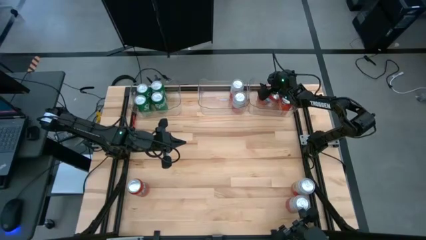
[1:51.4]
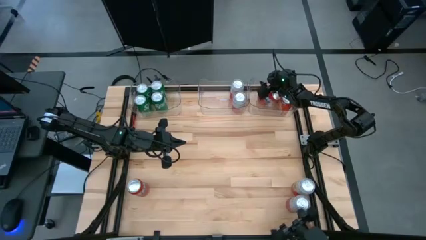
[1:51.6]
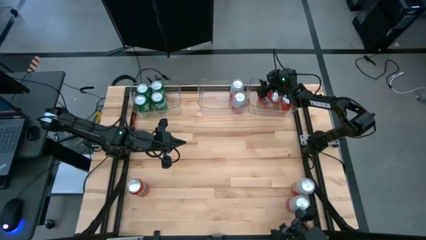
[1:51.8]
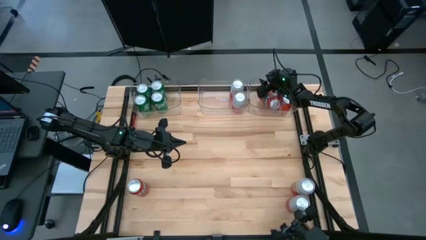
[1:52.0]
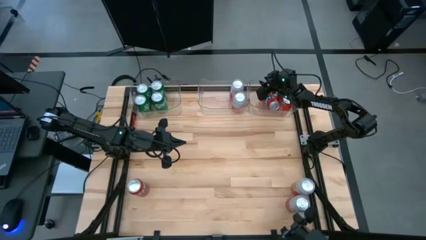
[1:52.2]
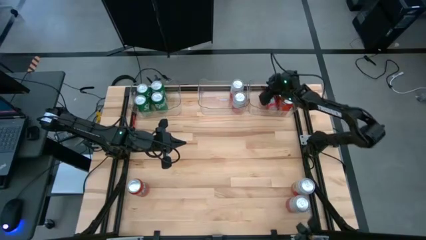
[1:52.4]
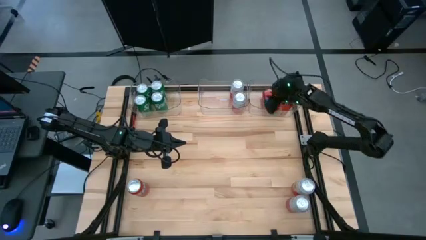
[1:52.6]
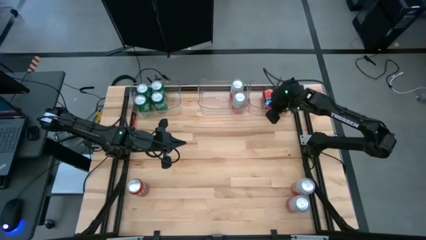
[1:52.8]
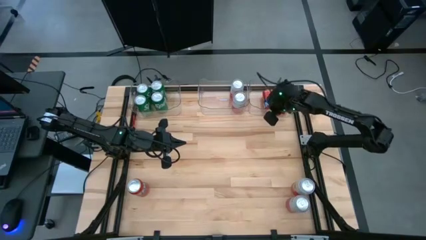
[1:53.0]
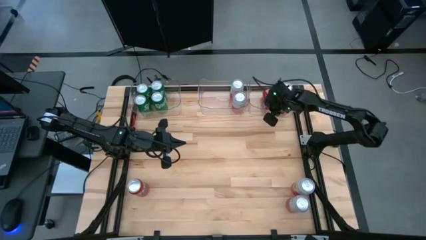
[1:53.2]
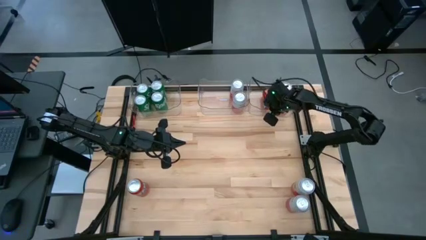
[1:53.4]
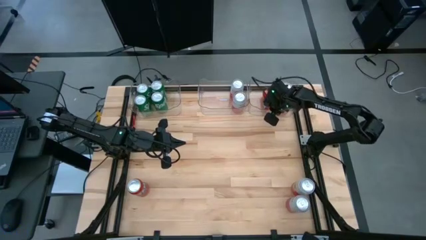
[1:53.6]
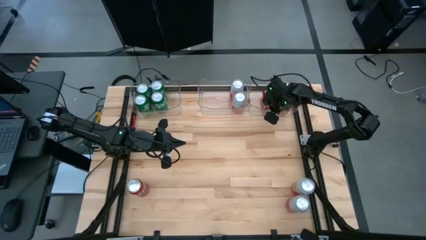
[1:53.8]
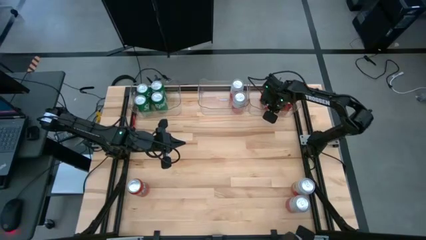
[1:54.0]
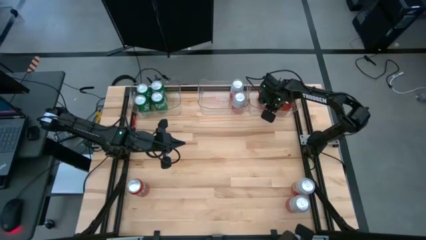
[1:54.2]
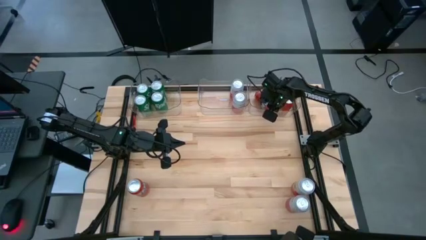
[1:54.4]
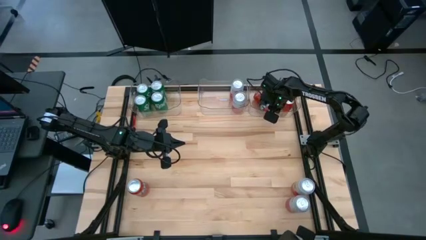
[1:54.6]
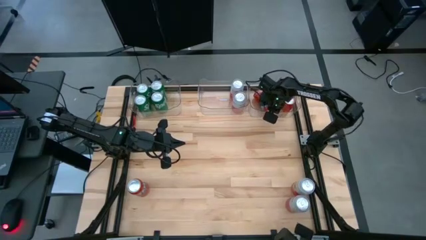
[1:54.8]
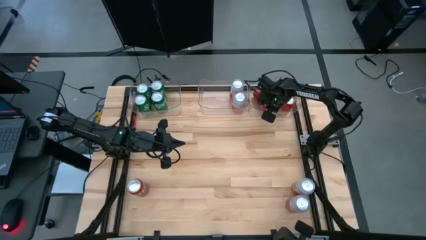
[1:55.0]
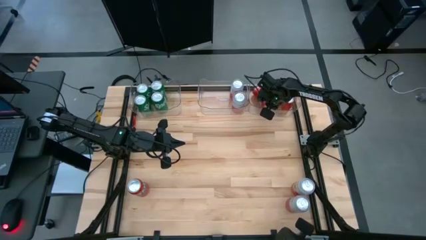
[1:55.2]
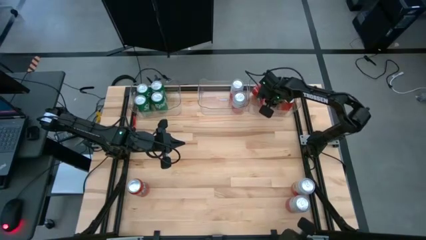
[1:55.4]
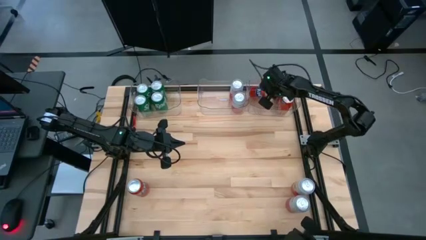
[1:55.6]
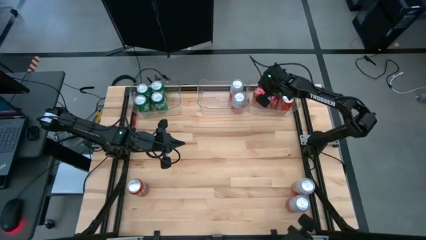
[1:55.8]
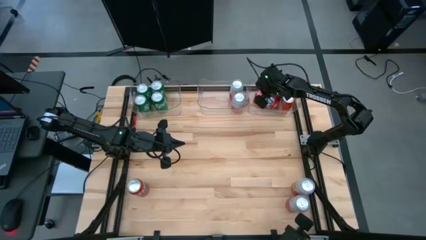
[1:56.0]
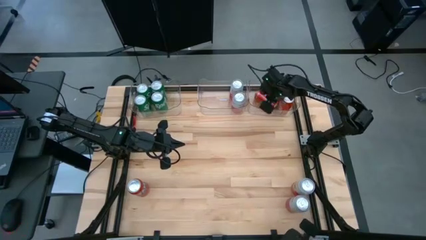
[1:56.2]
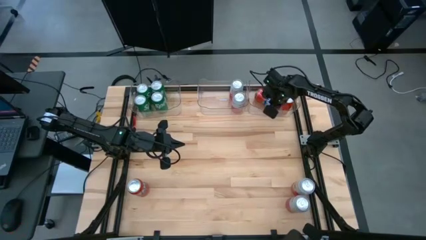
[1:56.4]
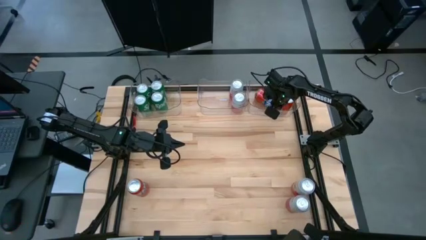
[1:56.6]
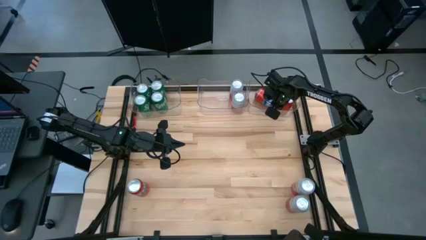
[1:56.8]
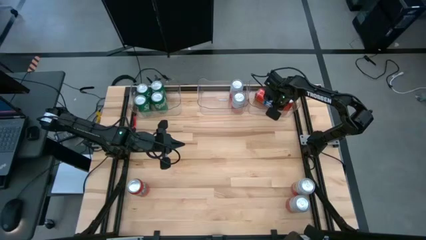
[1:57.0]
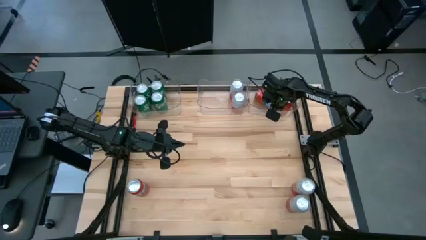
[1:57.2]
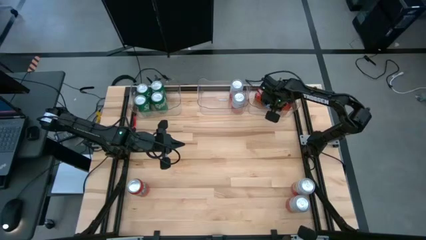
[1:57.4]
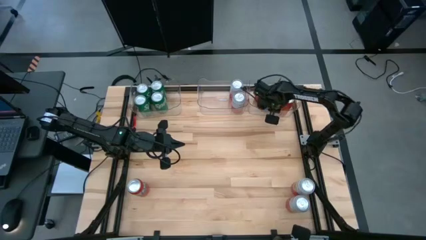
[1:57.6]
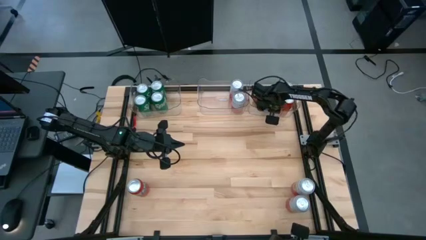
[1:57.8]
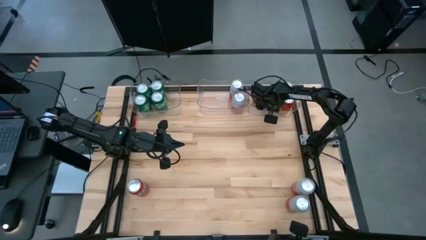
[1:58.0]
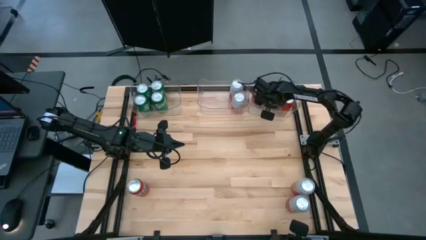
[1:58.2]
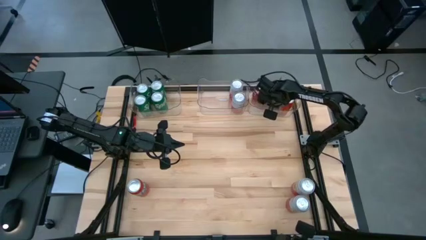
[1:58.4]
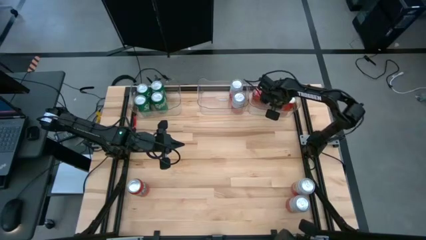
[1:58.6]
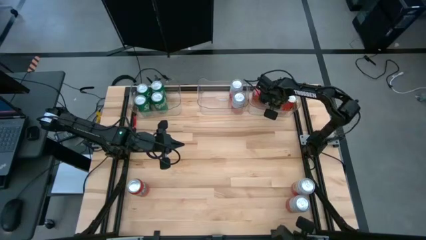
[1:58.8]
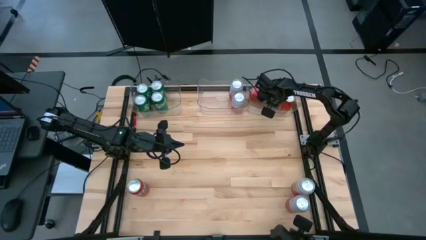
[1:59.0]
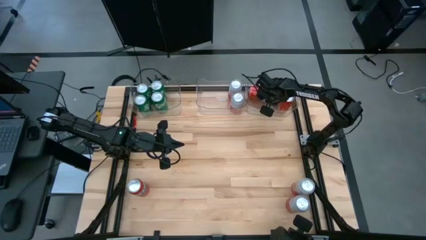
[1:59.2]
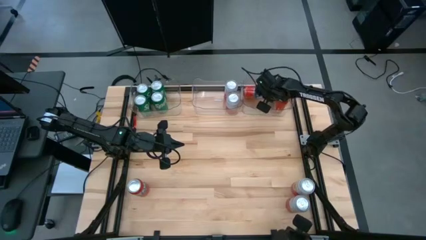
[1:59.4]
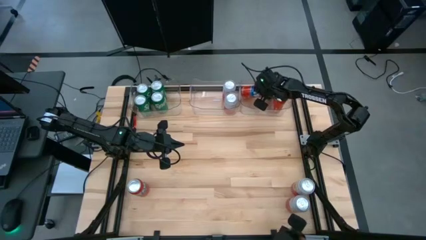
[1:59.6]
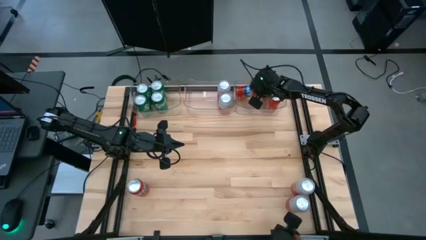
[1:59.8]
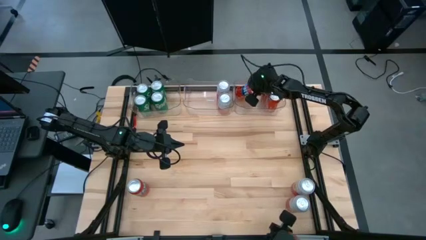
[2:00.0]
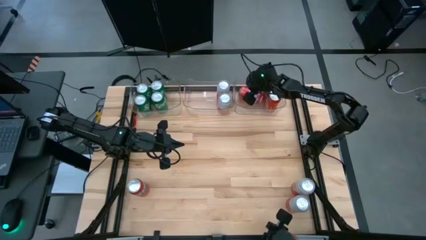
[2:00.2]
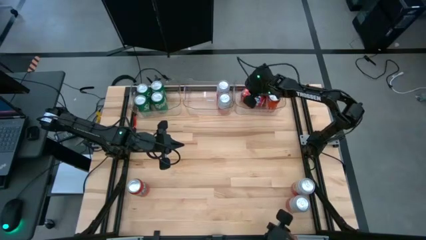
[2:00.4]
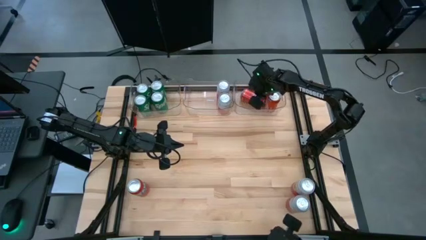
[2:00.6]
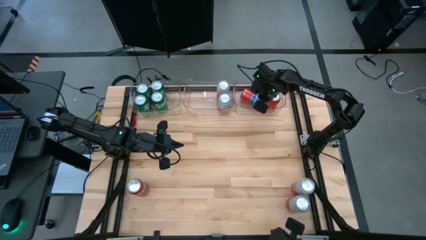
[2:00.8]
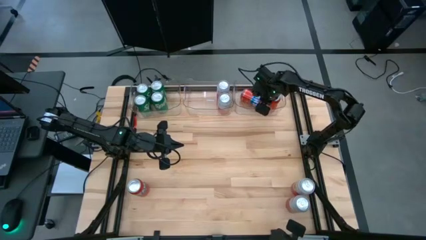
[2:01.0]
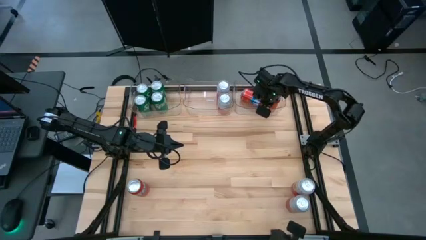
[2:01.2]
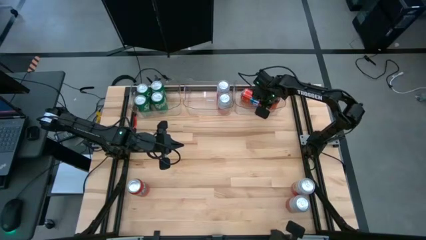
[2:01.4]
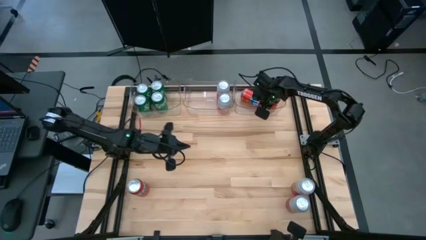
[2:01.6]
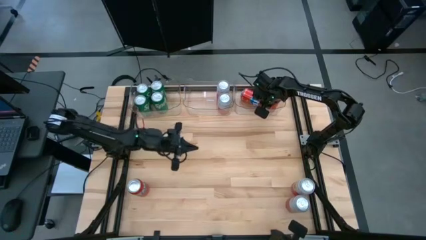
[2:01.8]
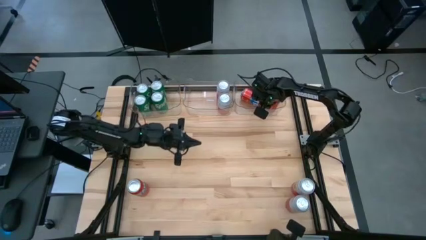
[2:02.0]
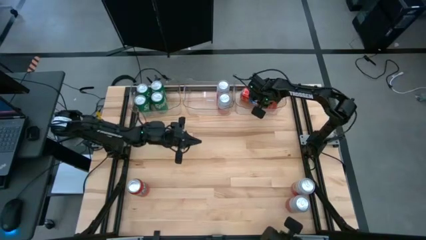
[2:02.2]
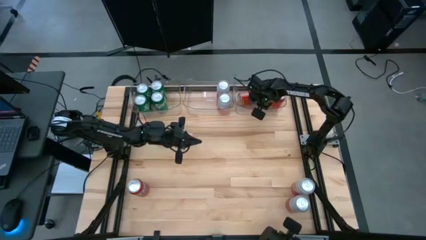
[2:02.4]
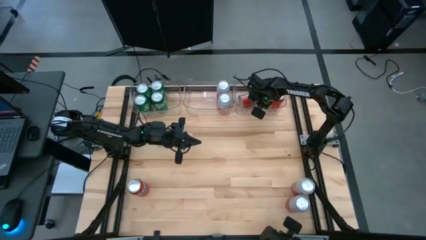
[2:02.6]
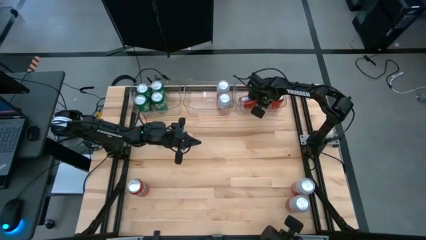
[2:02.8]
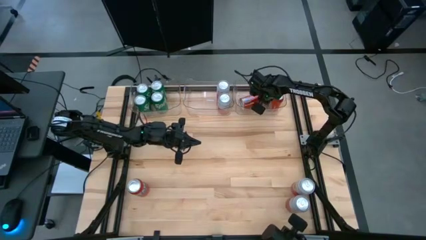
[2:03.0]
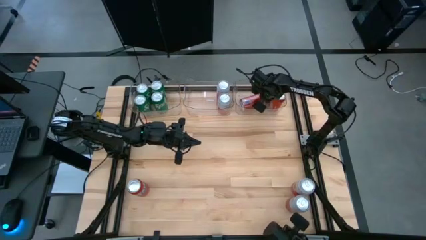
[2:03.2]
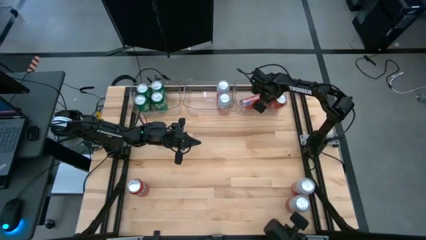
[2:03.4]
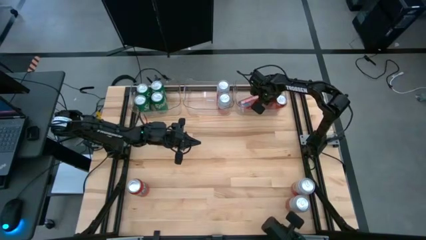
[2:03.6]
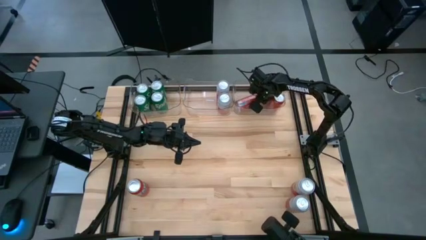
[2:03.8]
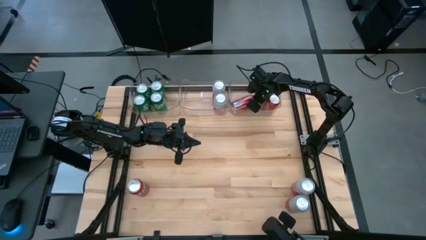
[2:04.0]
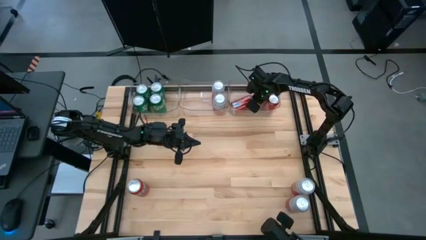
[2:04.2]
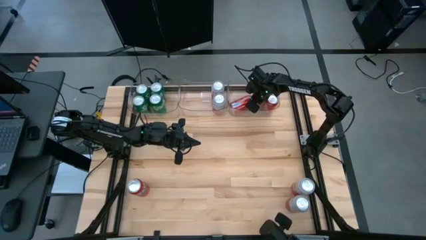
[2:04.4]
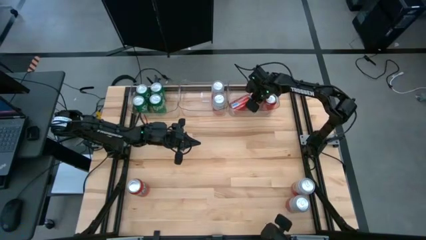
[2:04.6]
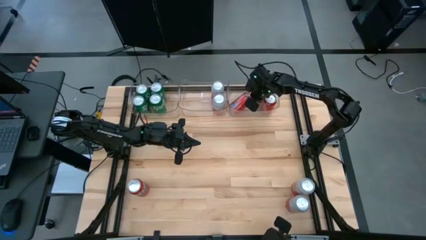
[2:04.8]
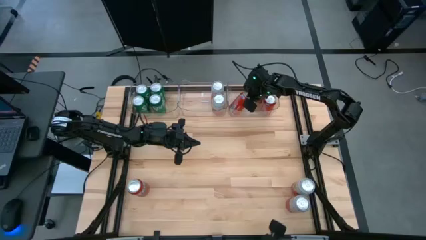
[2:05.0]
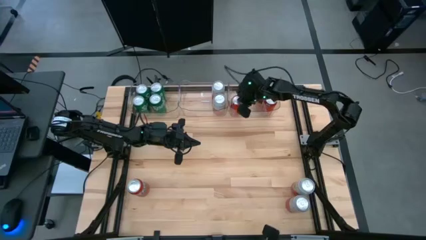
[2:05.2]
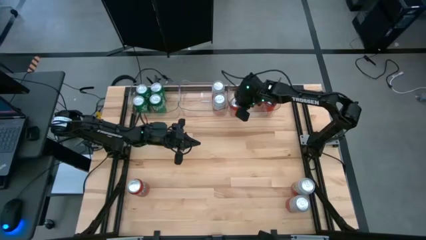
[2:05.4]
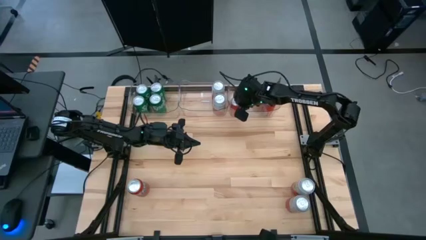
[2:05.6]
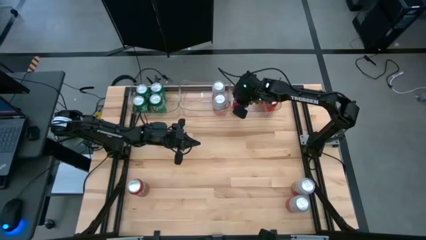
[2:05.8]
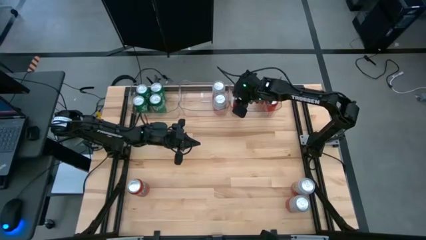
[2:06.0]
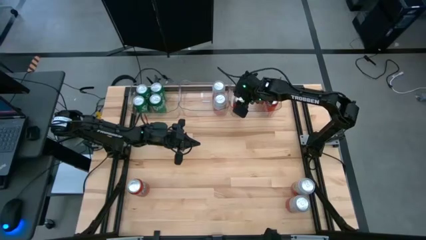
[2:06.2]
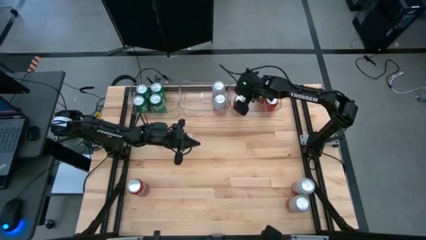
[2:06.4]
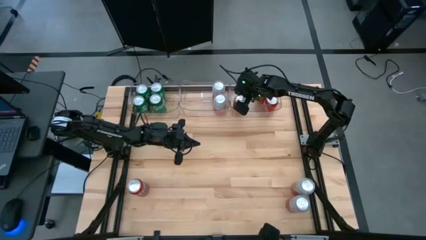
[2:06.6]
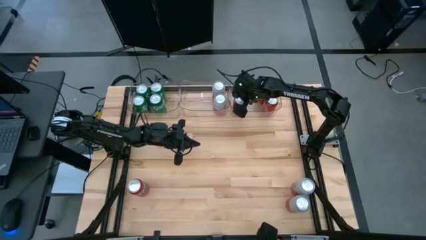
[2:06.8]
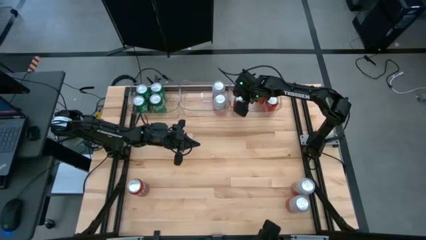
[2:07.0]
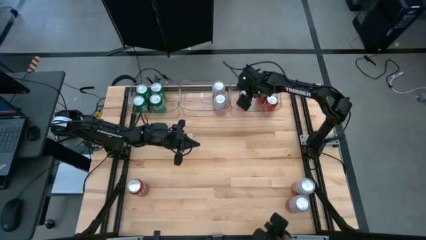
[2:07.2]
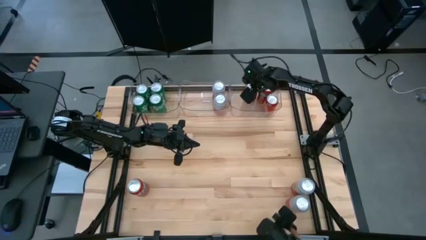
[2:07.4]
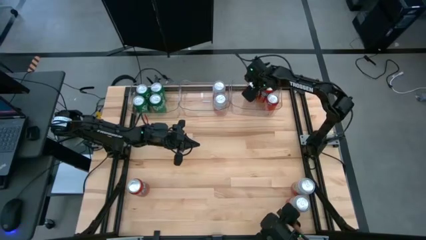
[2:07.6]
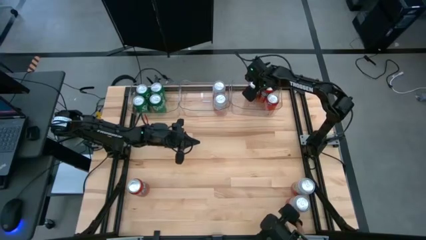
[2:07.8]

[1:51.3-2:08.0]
Task: Sort soda cans
Put the red soda can into the right transparent bin
